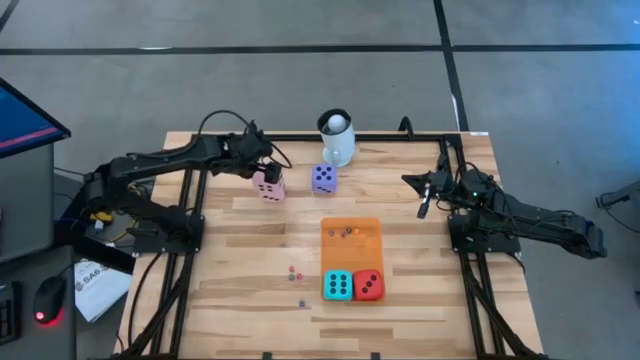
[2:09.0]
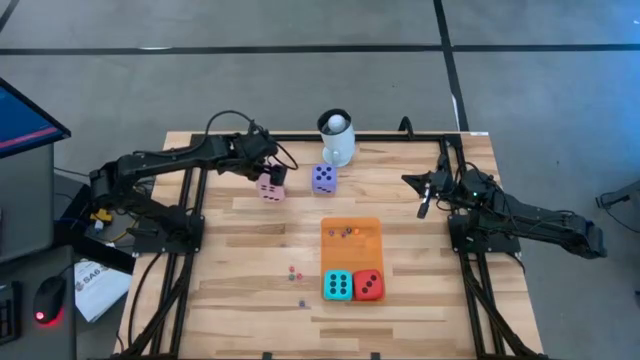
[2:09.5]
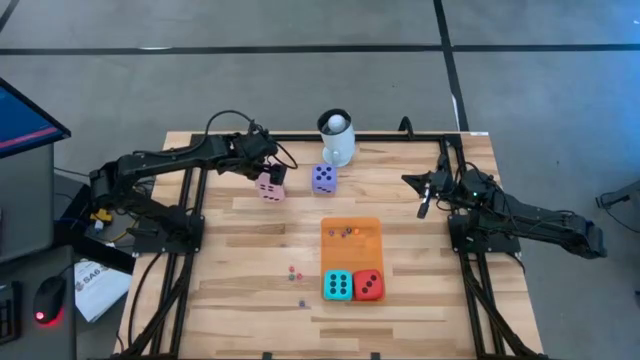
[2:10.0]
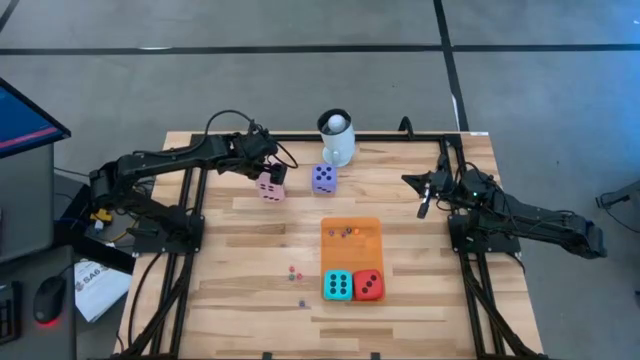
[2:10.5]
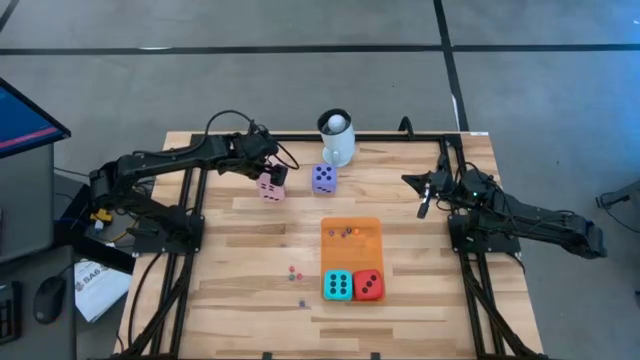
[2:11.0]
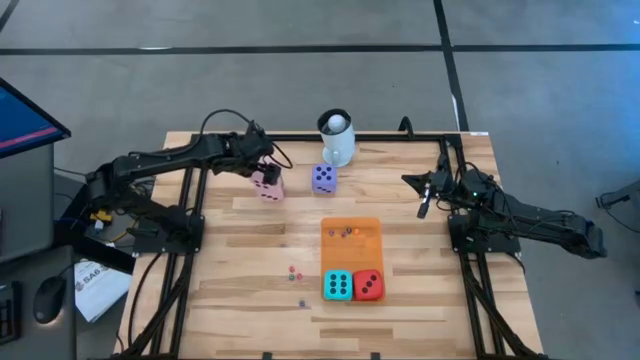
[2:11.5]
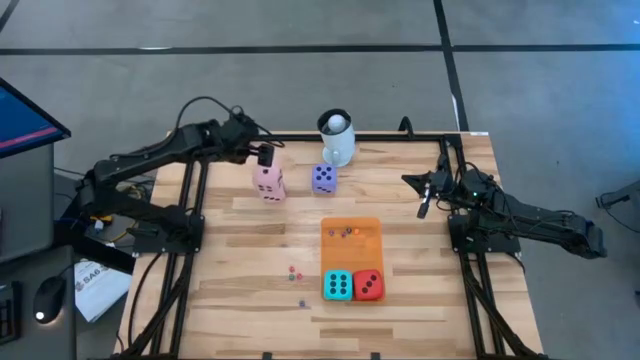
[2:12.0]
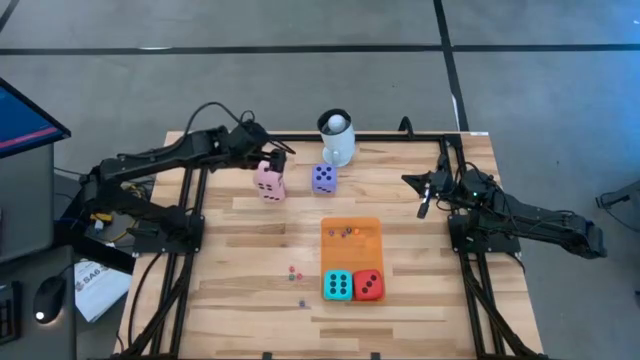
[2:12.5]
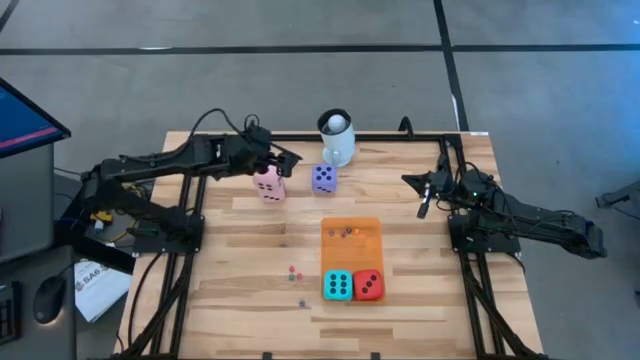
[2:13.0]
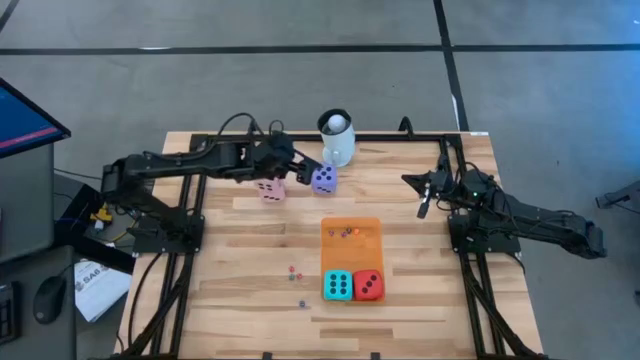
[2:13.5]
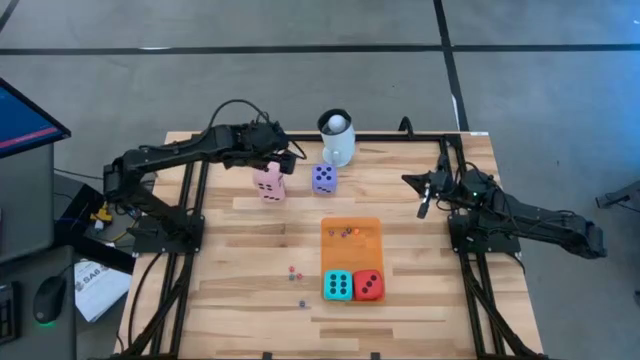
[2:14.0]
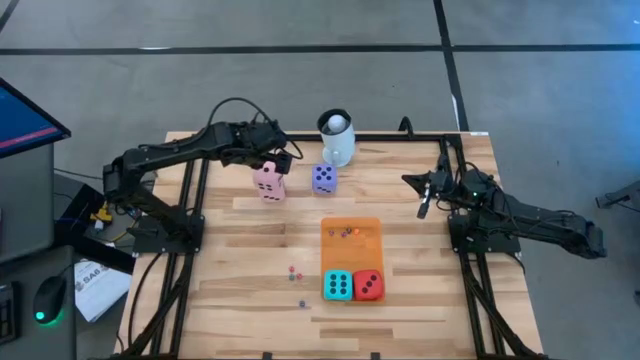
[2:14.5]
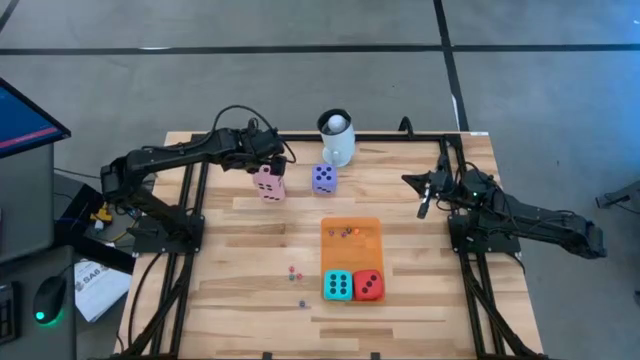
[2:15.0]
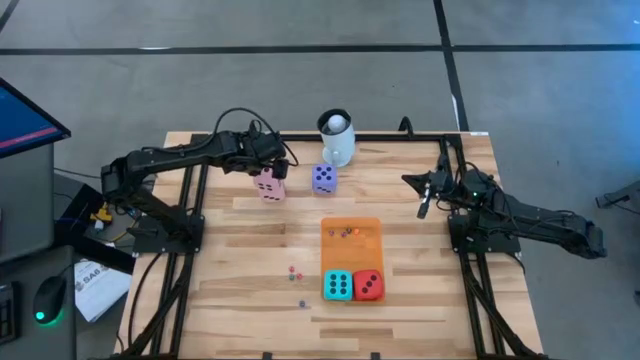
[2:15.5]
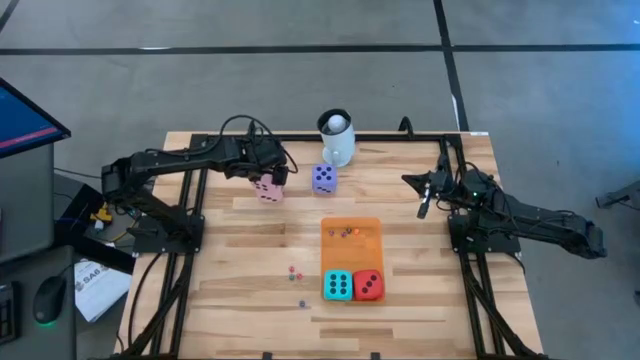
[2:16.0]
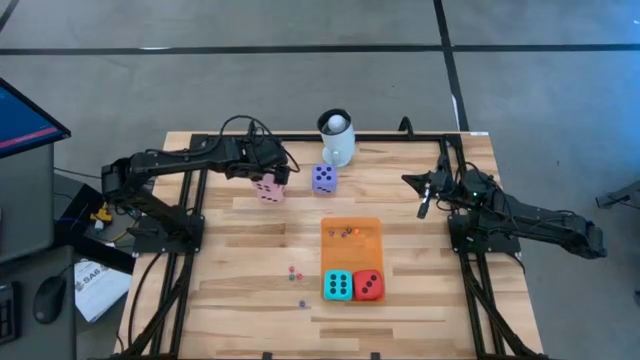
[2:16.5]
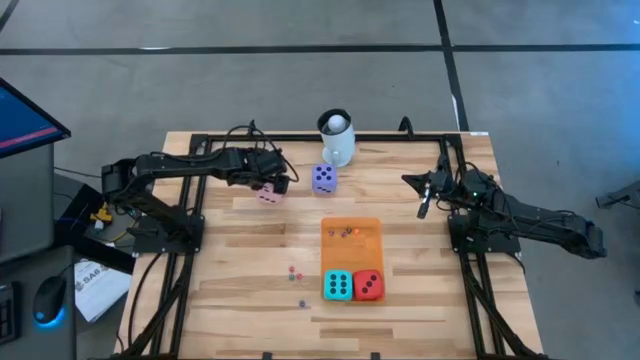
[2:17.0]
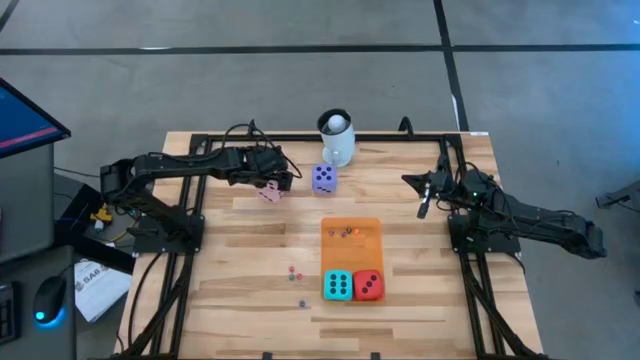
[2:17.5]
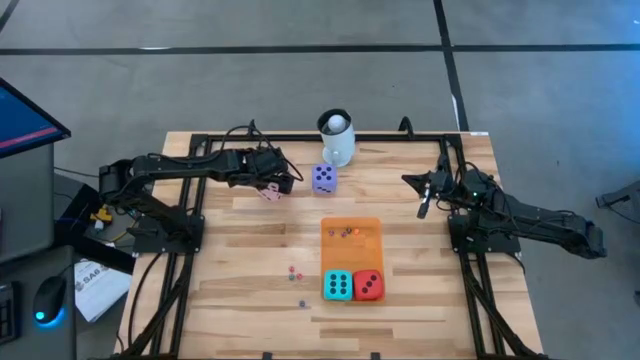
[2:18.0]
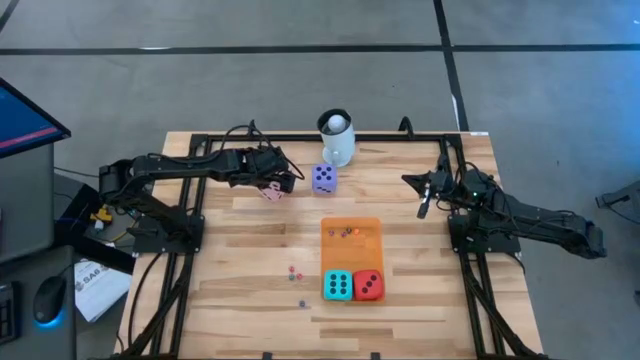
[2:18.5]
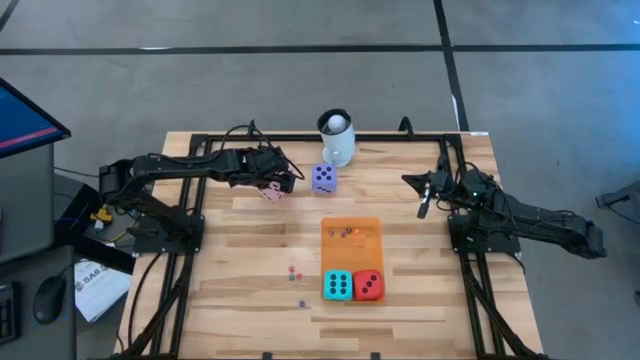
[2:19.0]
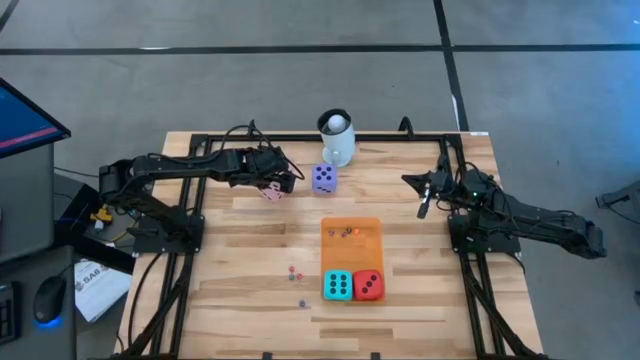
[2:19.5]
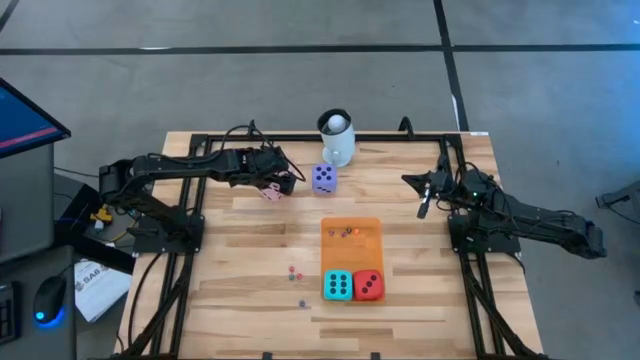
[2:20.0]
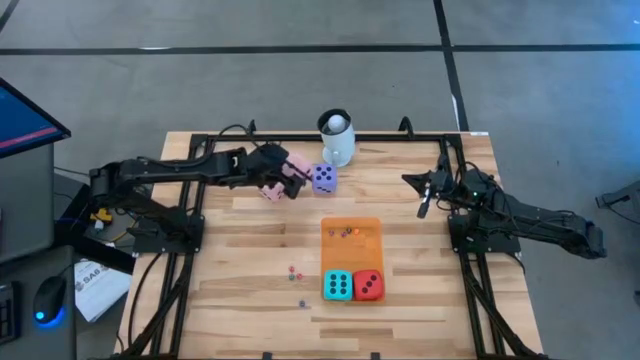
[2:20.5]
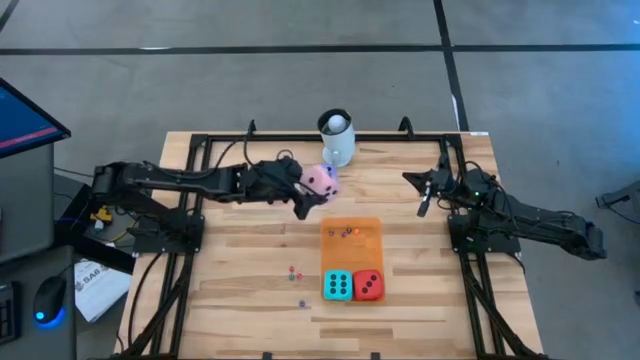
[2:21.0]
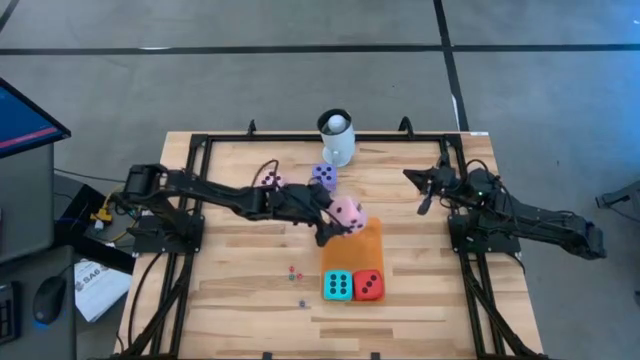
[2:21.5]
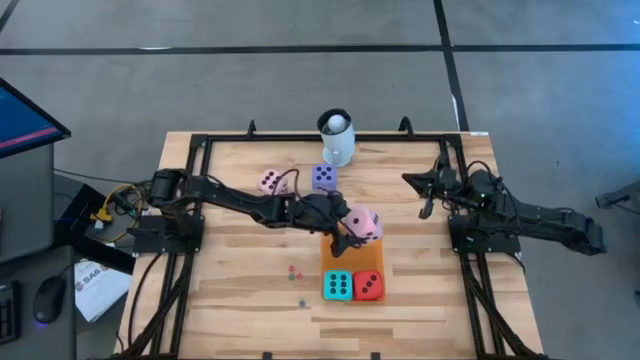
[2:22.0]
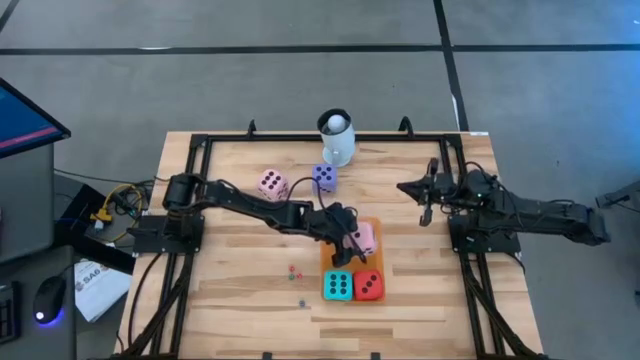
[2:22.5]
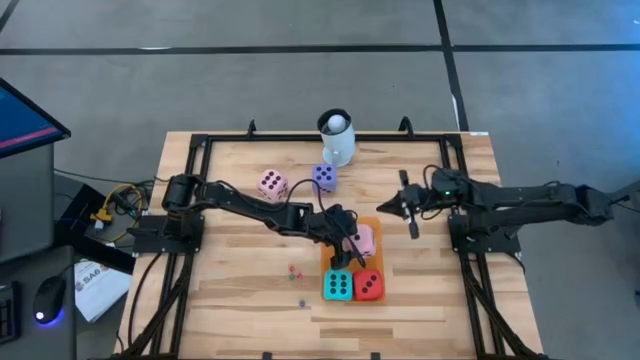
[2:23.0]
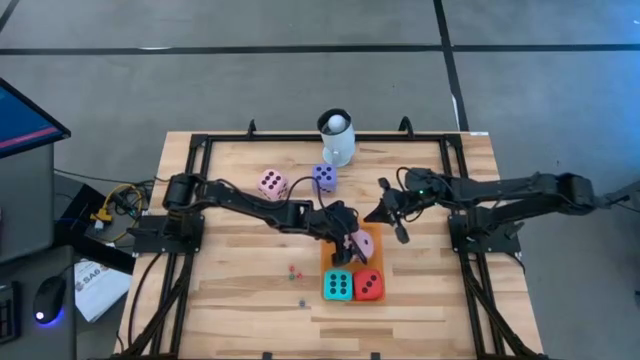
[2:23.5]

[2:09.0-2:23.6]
Task: Pick & Place Dice
Put the top large pink dice into the orange bin

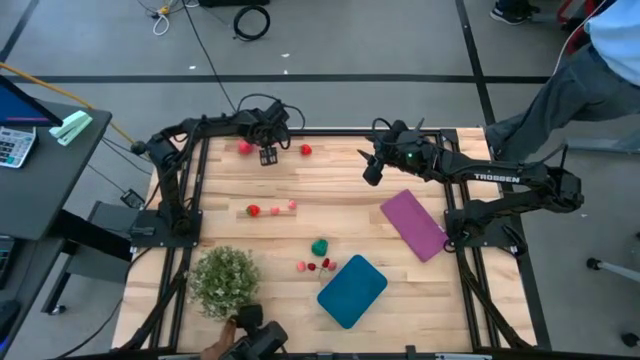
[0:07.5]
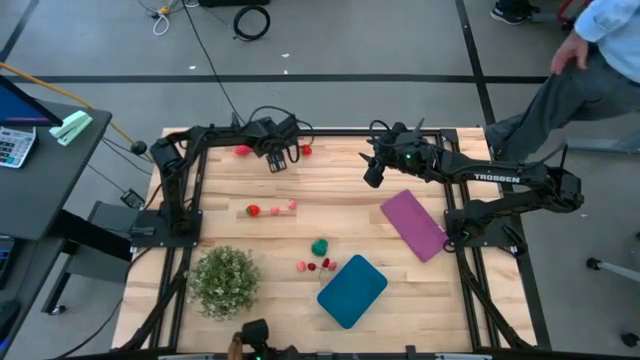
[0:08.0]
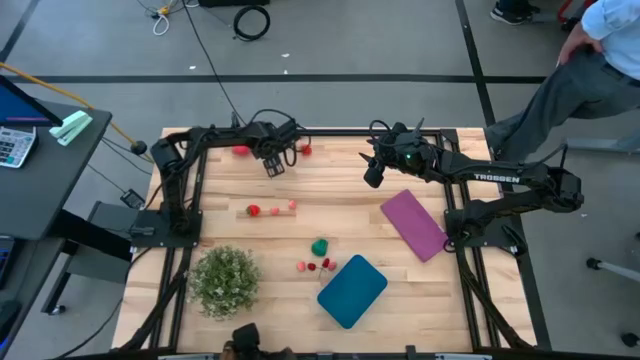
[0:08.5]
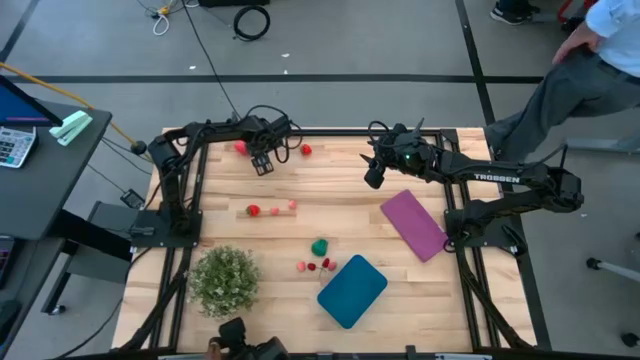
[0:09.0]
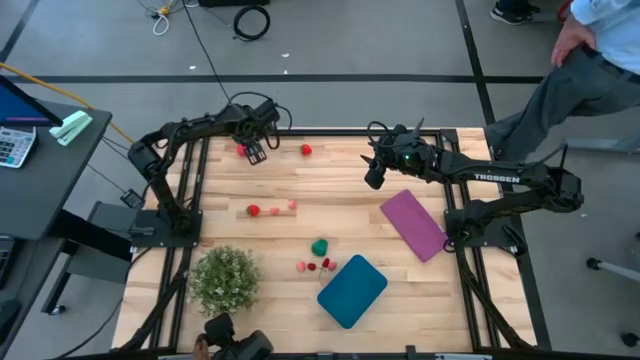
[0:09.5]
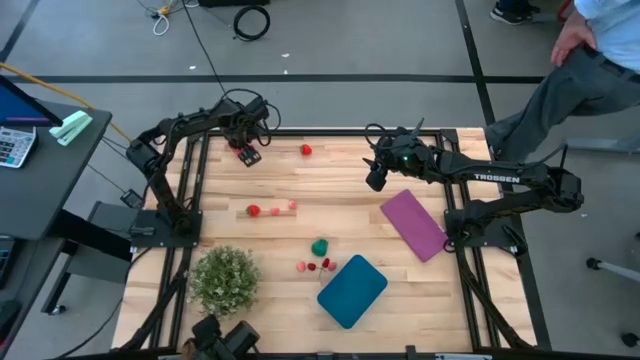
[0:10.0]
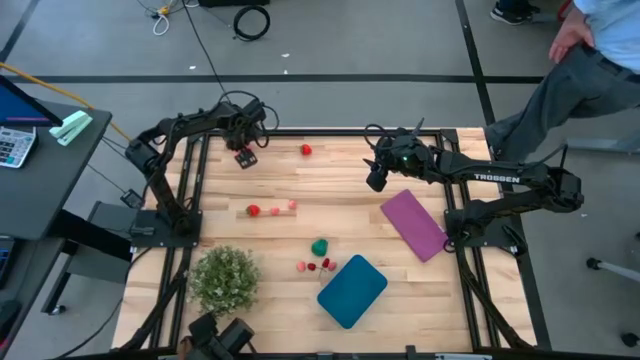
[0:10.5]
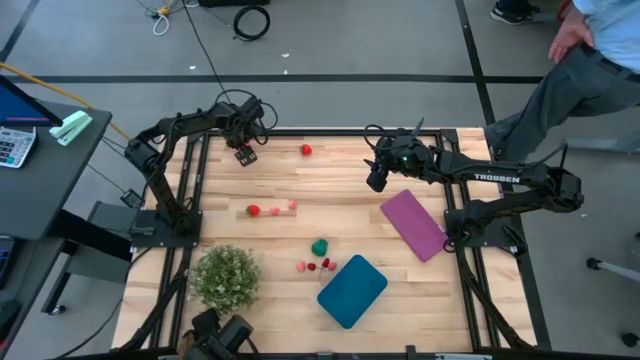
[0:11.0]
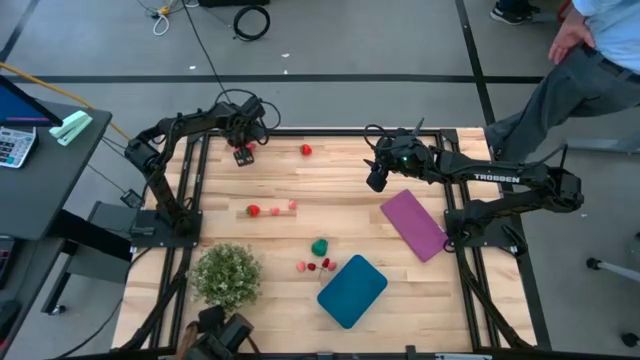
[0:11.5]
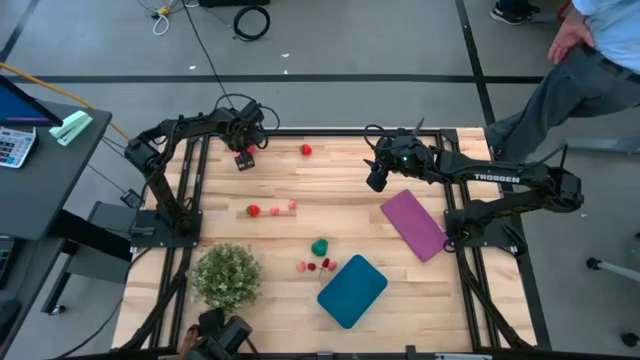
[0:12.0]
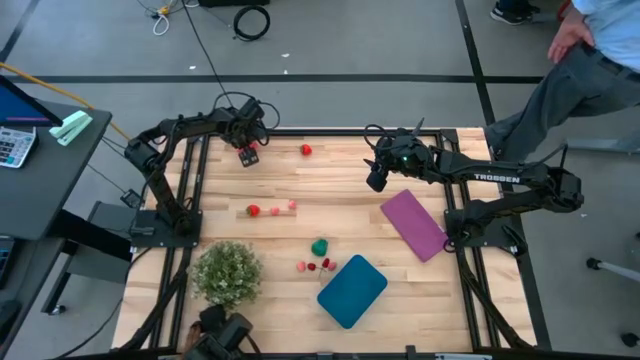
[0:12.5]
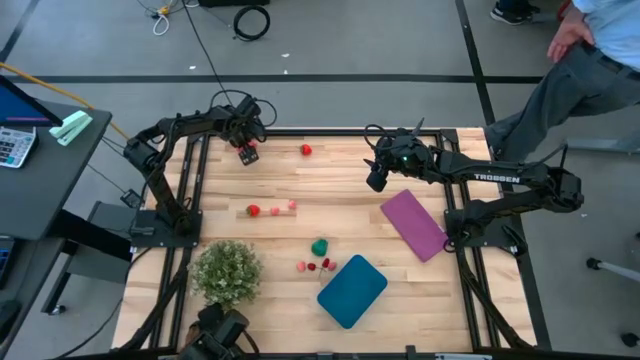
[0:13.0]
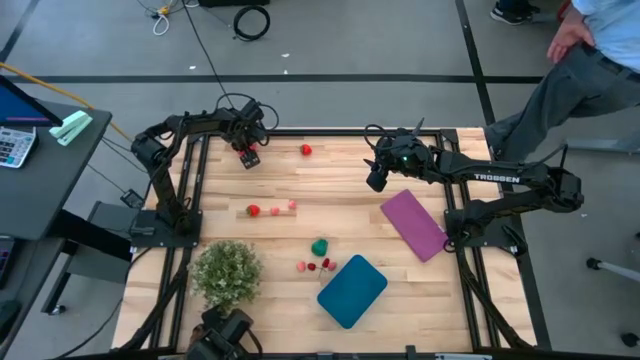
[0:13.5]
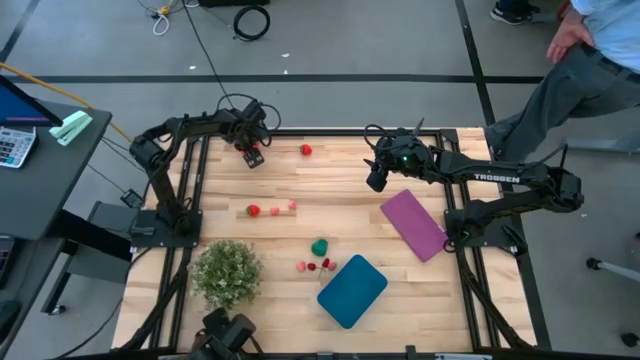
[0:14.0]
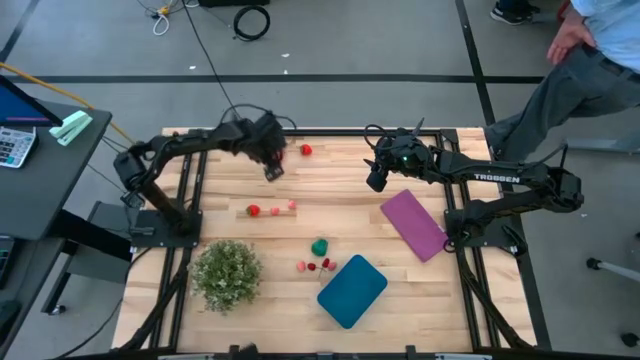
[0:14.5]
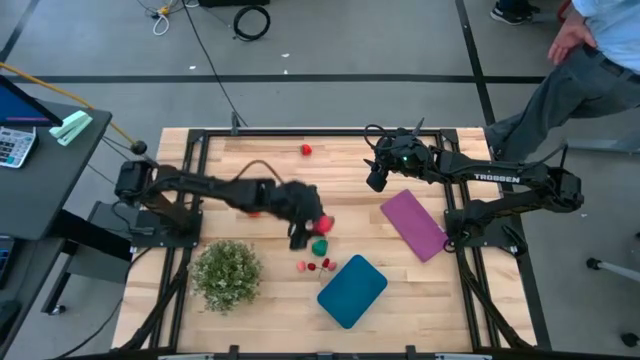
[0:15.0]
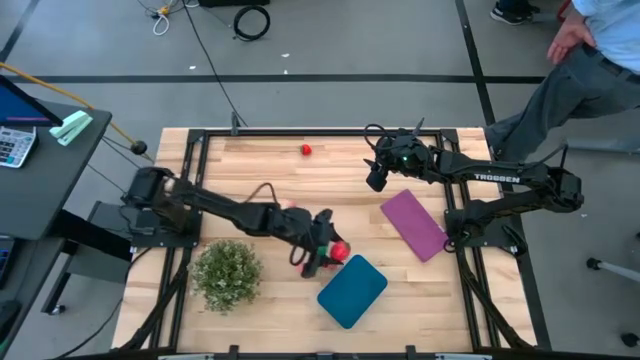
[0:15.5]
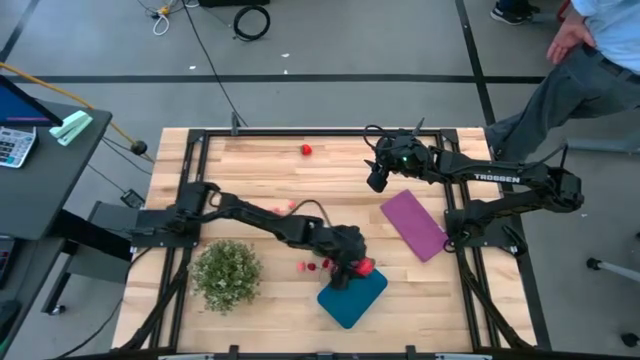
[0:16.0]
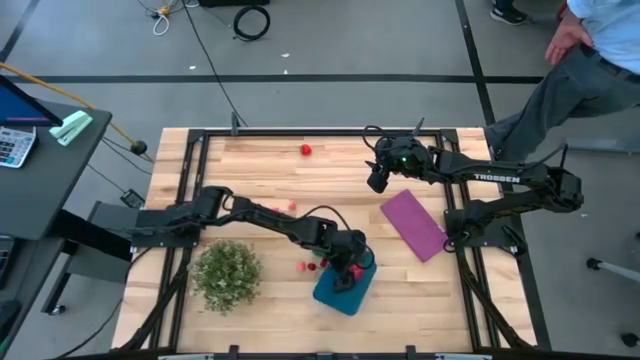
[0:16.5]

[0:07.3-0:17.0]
Task: Pick and placing Produce into tupperware
Put the pink dragon fruit into the blue bin
